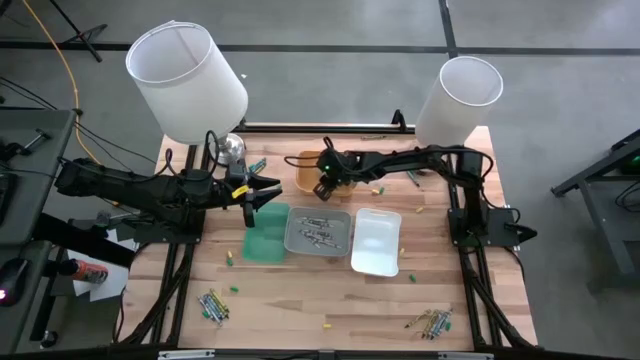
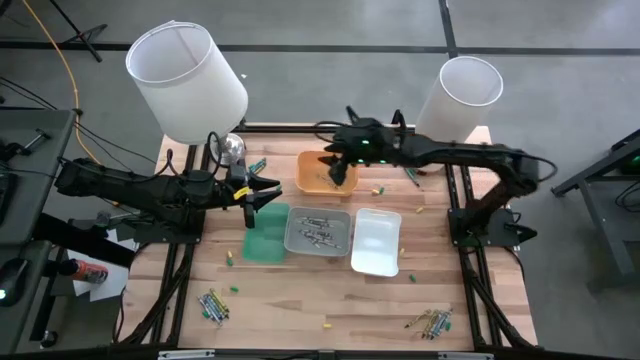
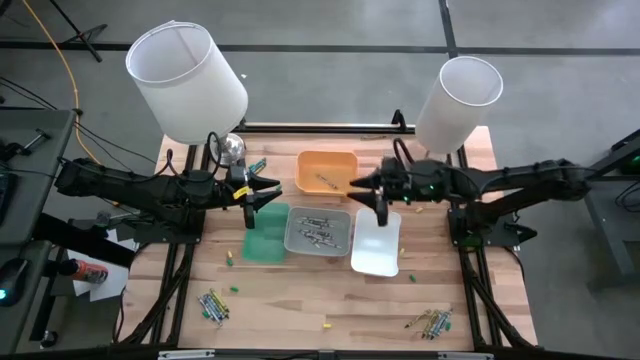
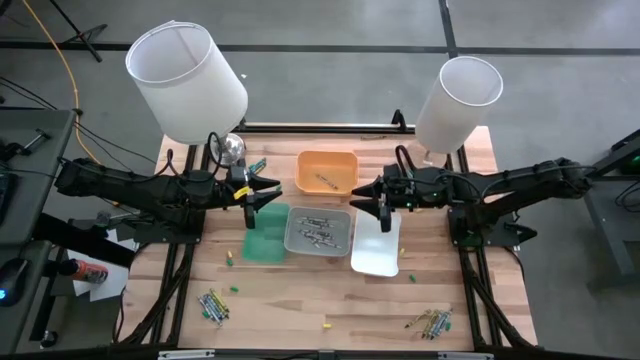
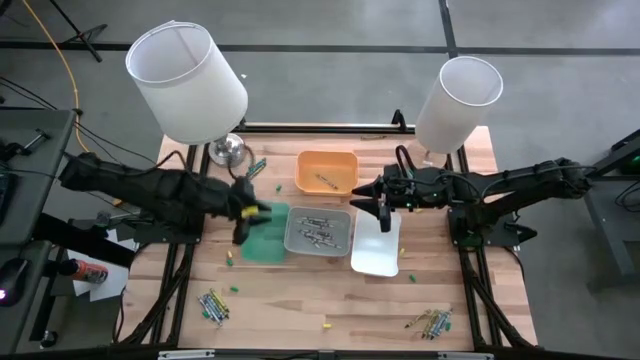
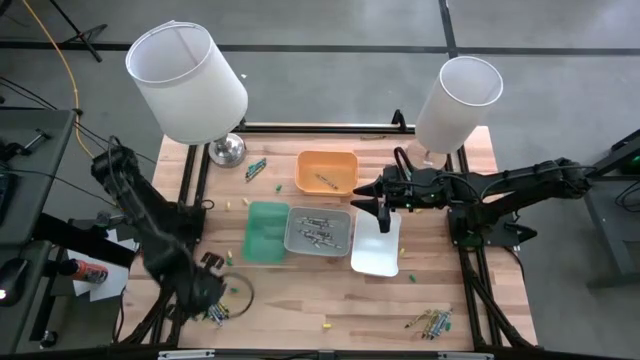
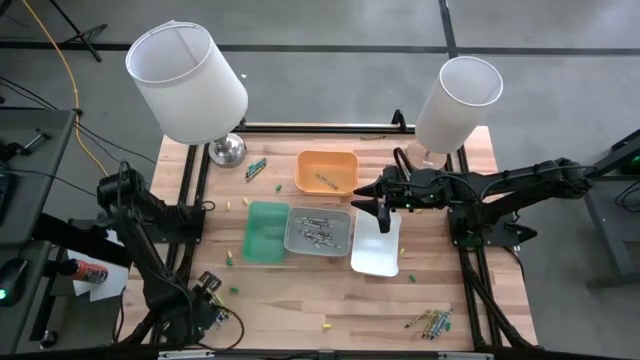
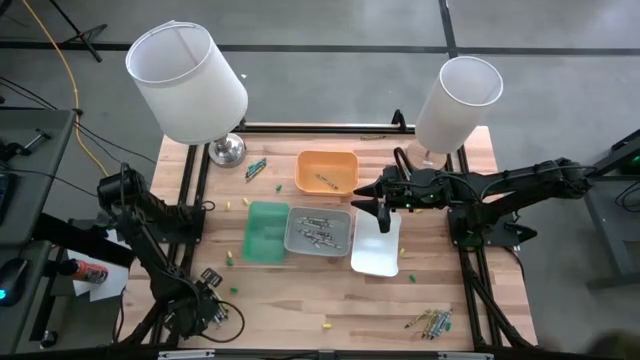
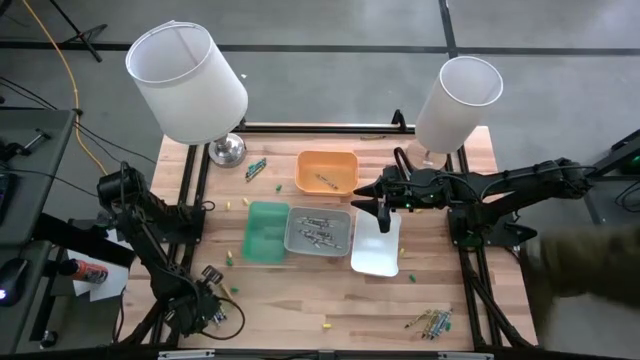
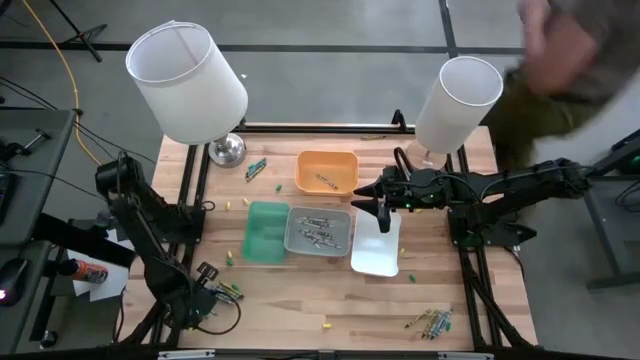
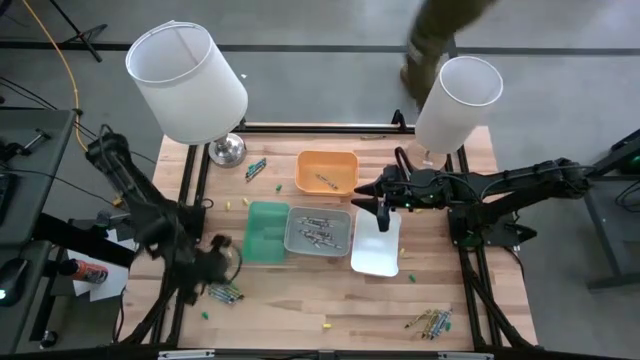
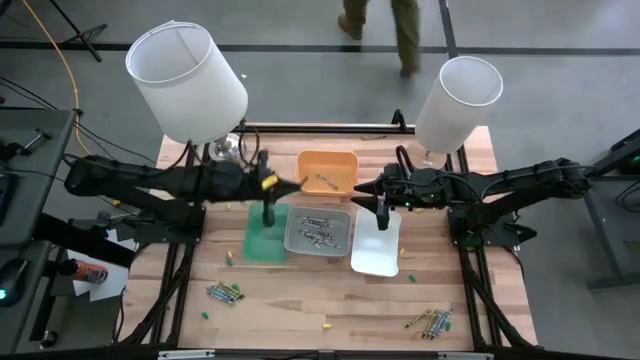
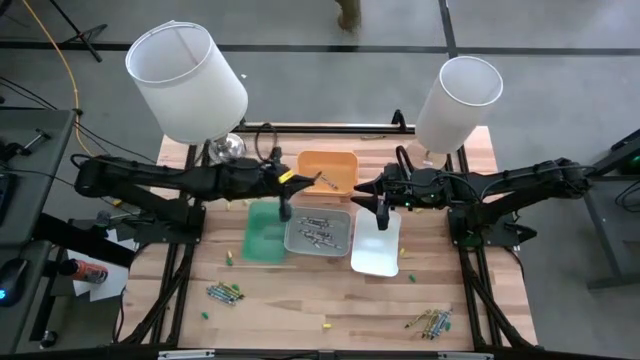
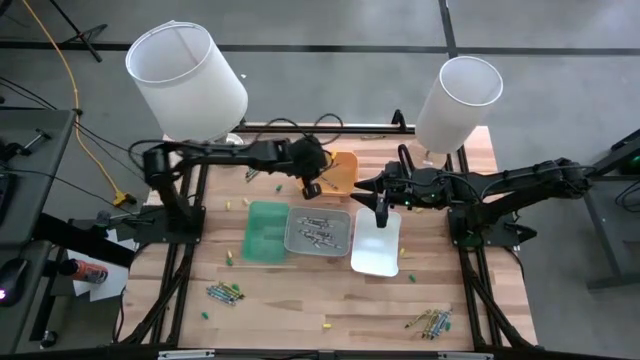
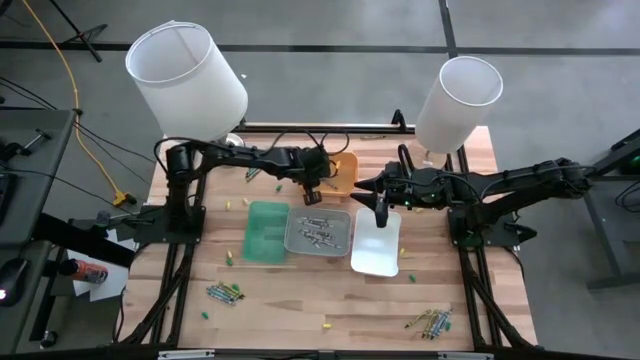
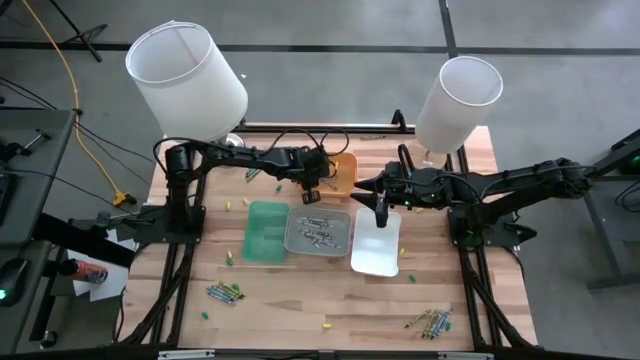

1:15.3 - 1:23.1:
Task: Sort crayons
Put the gray crayon into the yellow bin

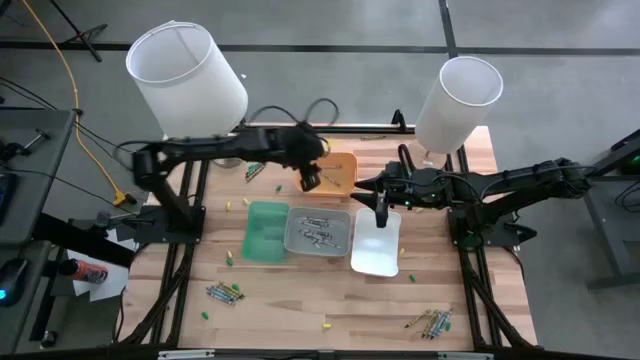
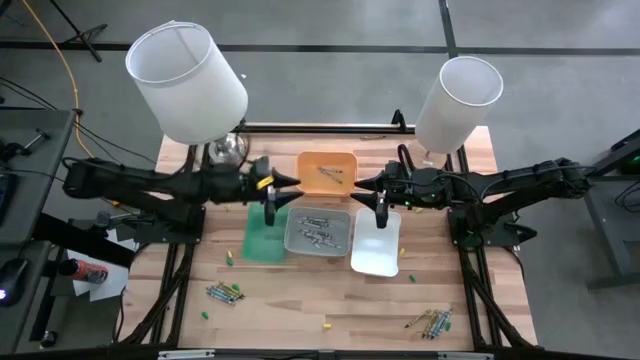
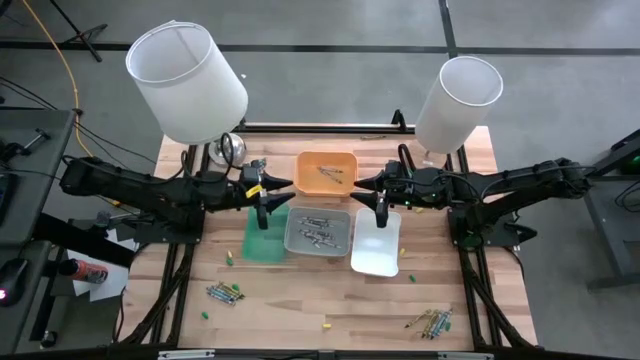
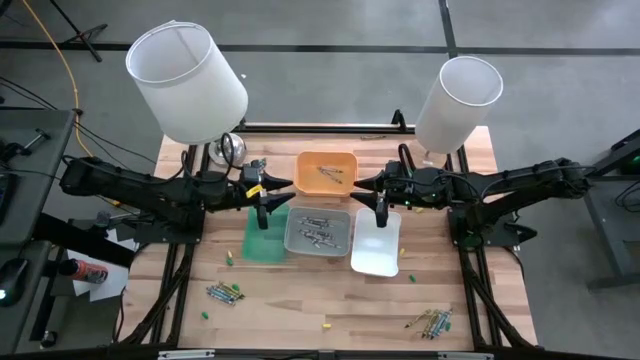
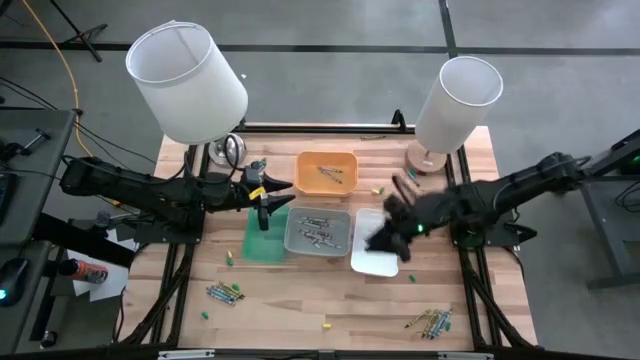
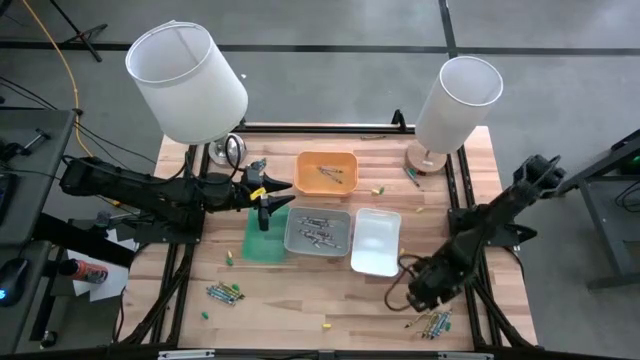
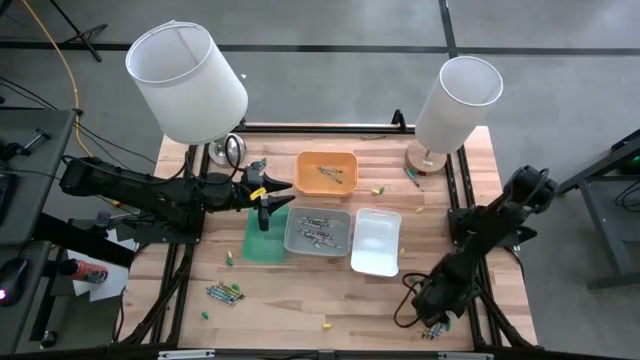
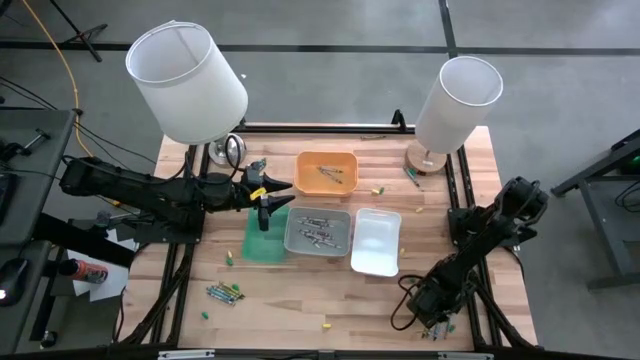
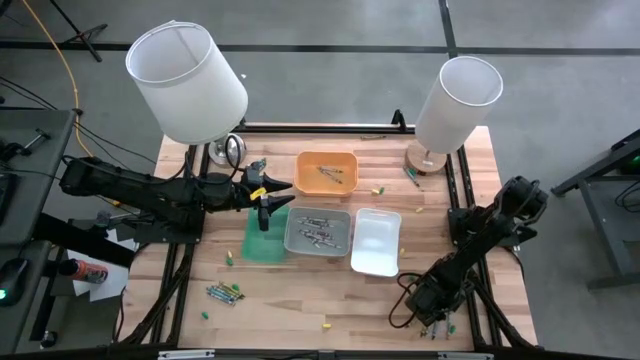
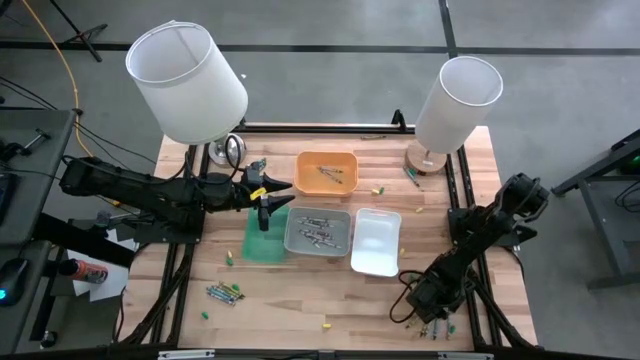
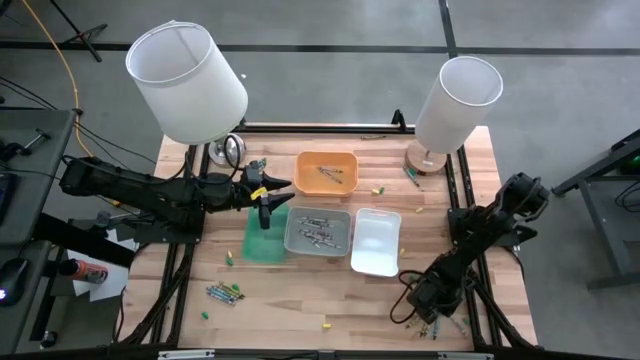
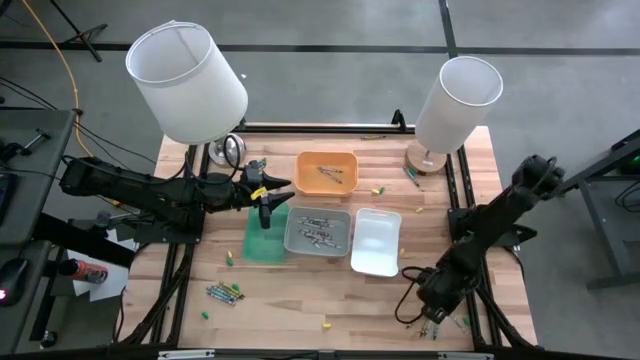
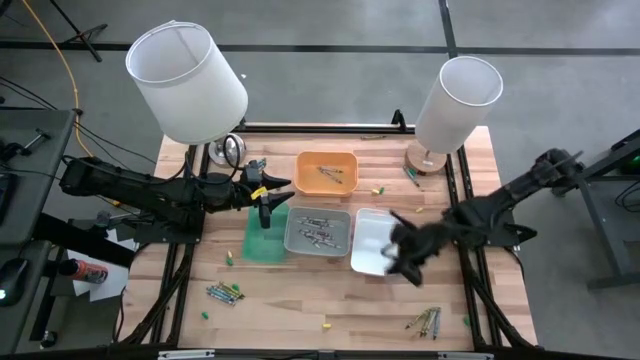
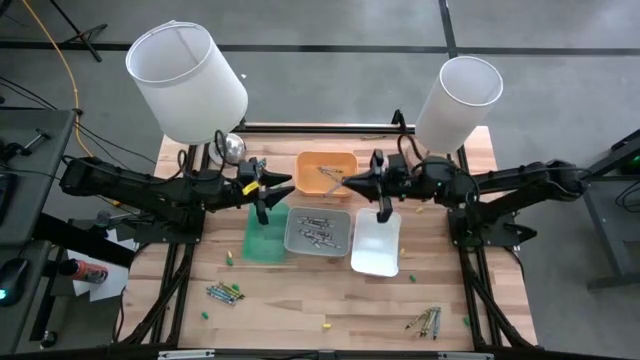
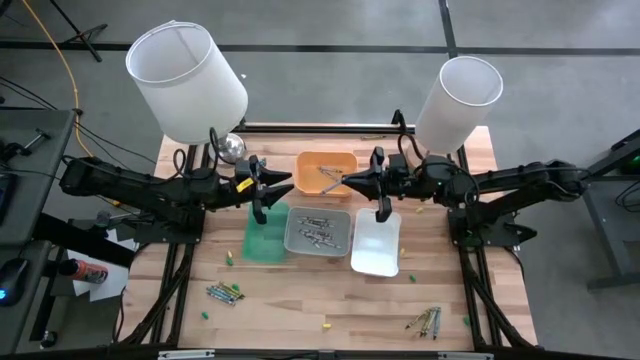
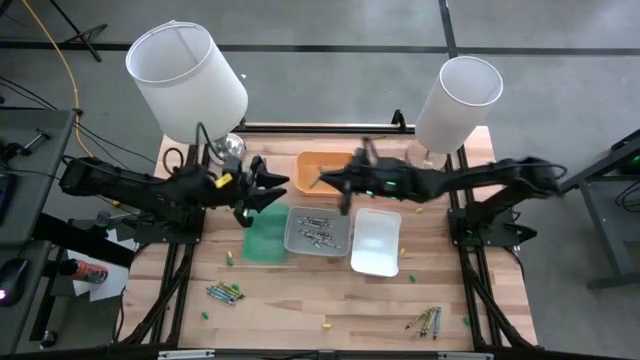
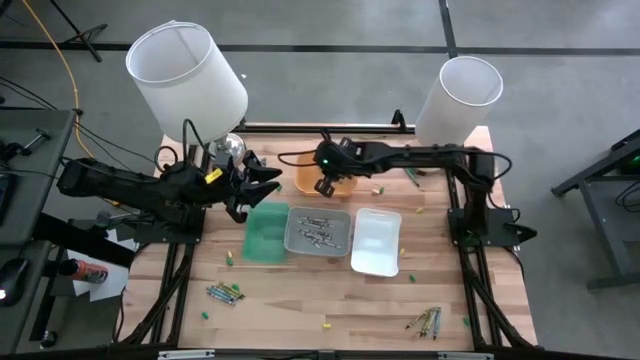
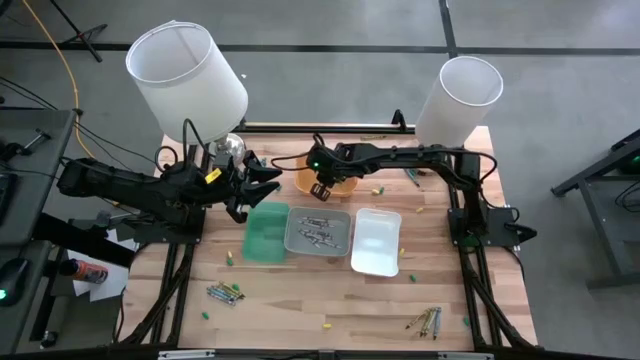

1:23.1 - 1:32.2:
Put the gray crayon into the yellow bin

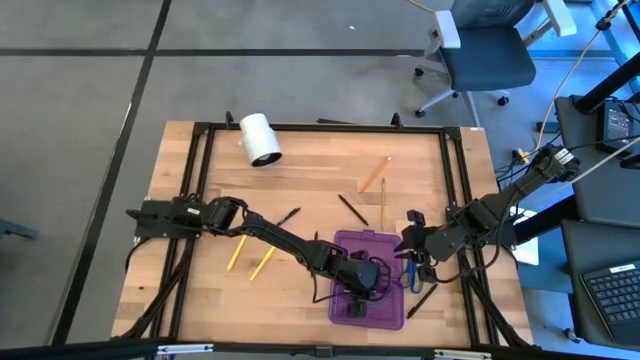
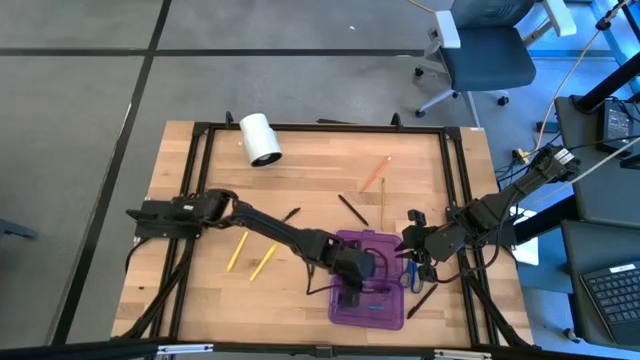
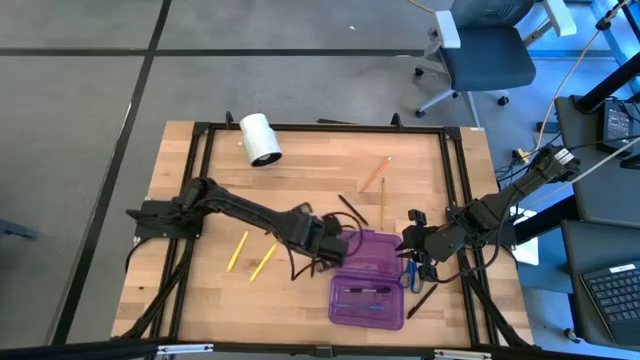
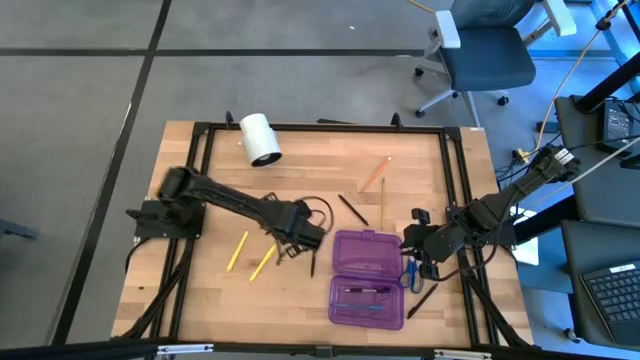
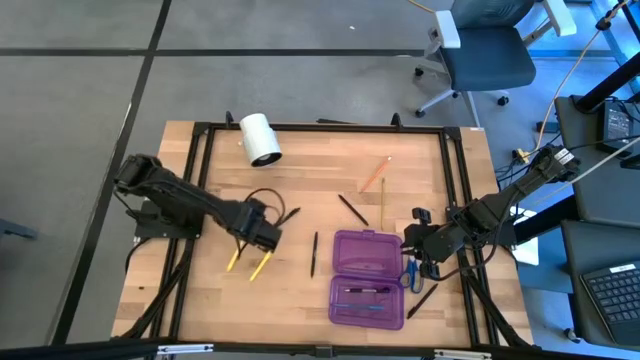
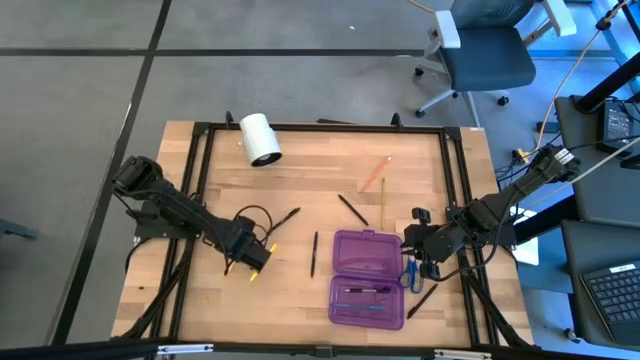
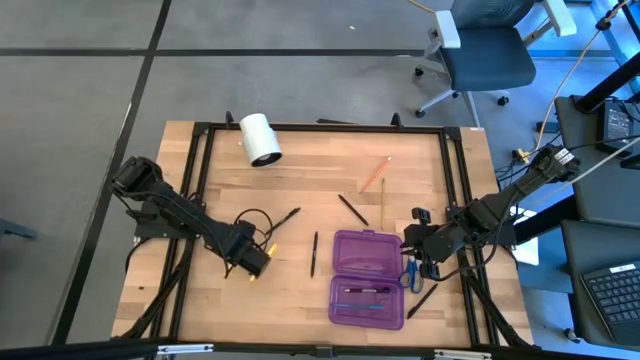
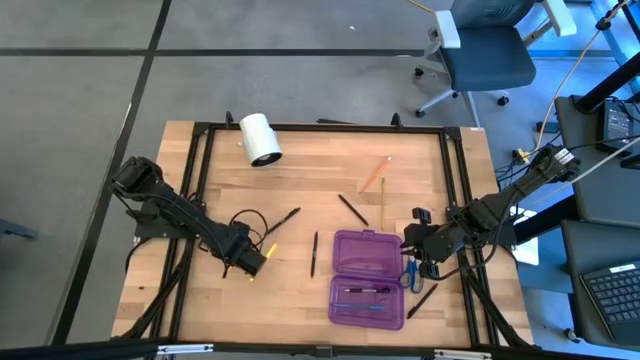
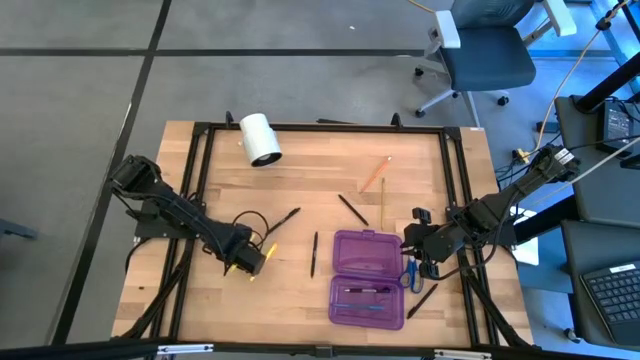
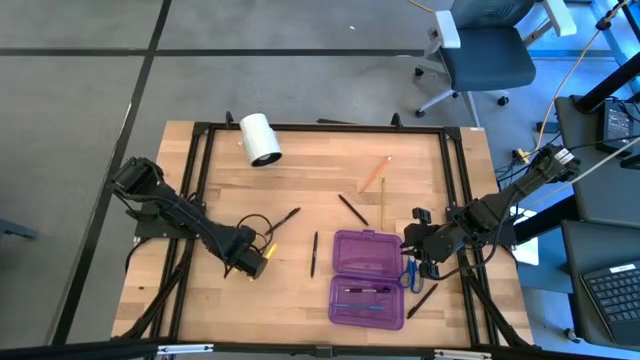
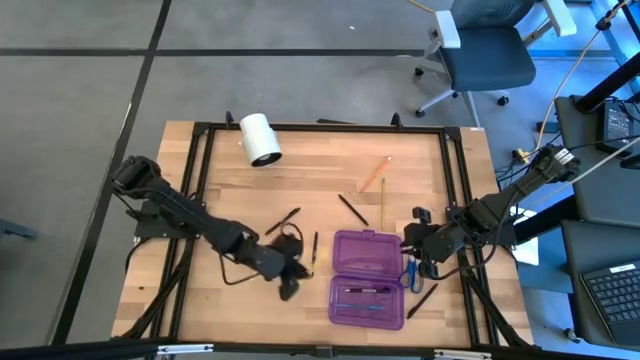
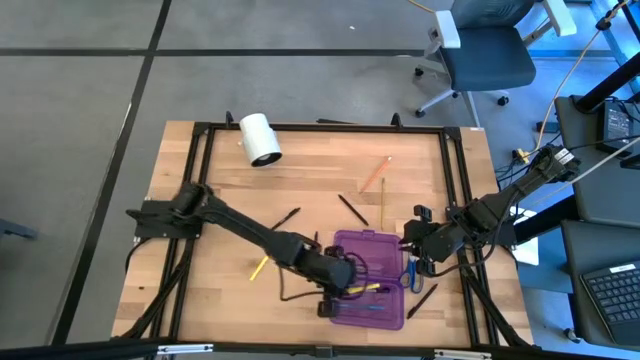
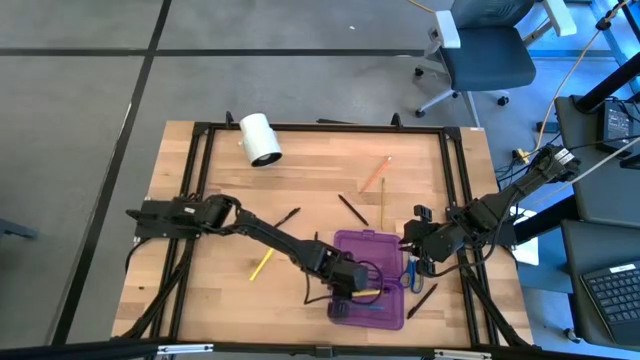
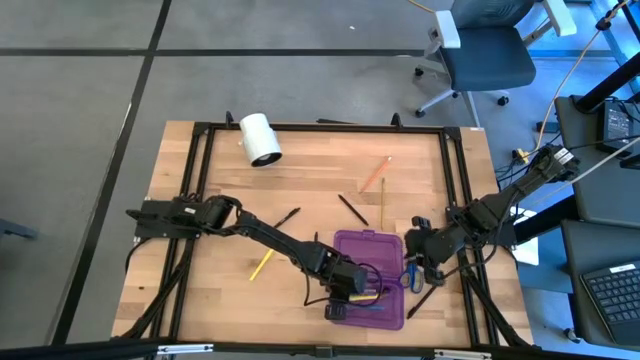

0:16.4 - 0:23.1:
Task: Pick & place school supplies into a supply box
Put the left yellow pen into the purple supply box
